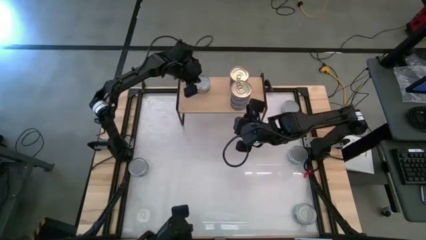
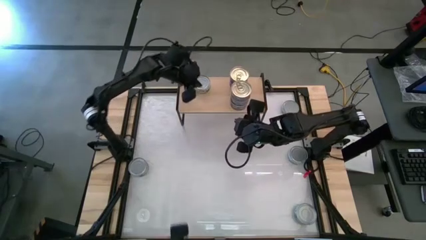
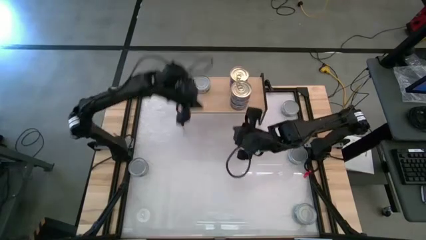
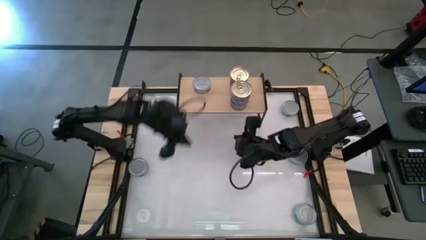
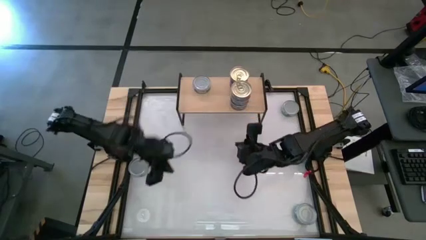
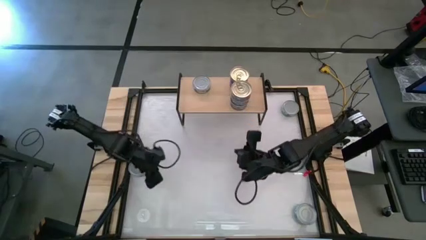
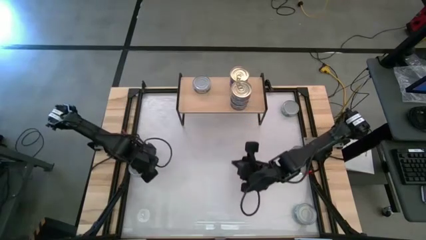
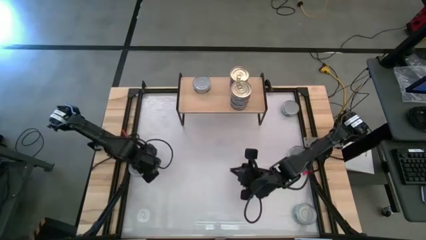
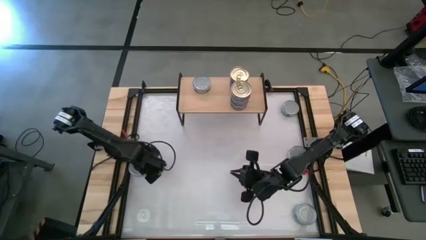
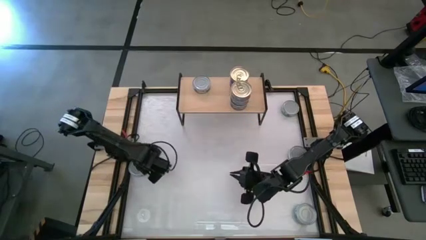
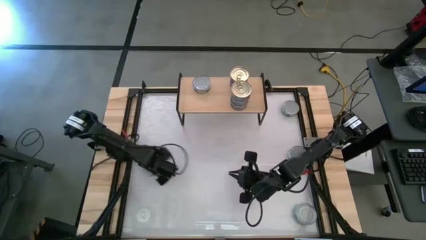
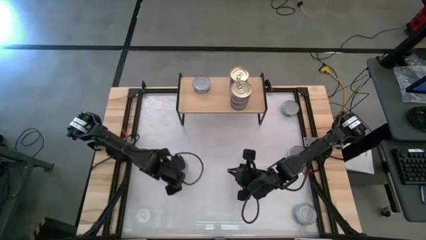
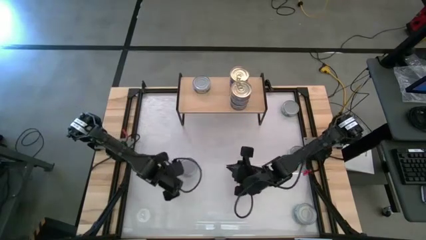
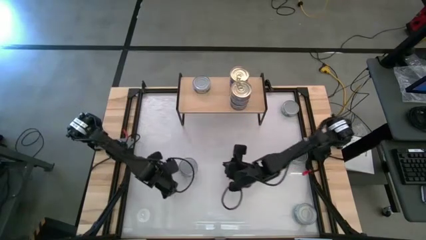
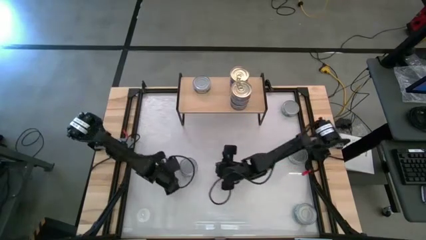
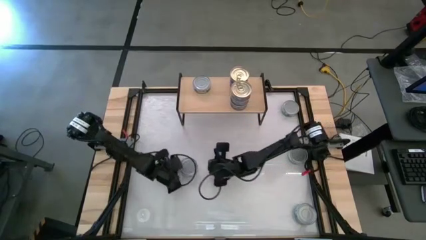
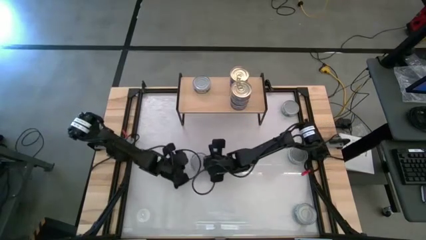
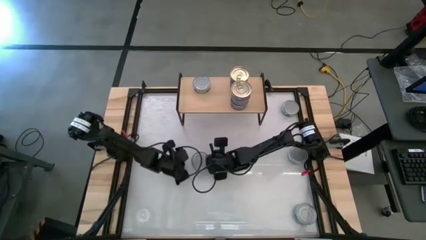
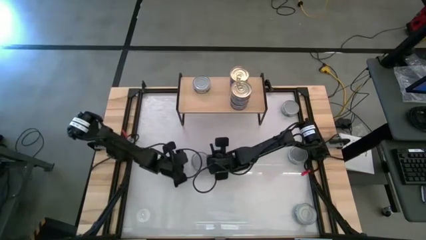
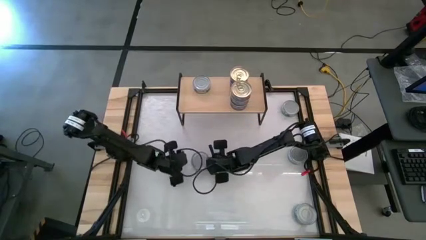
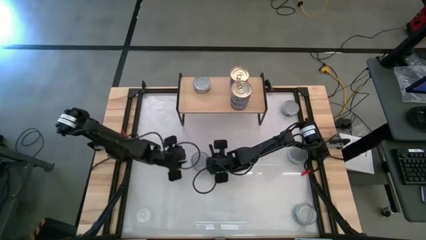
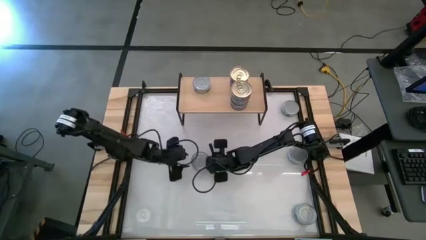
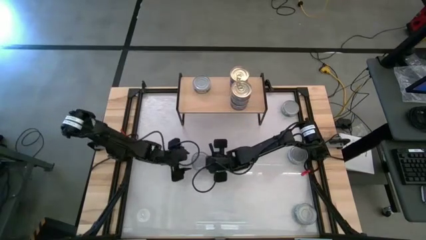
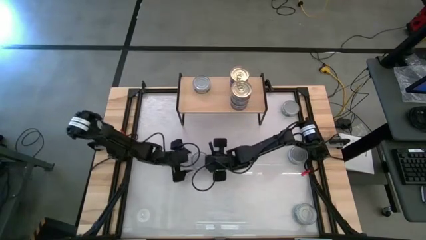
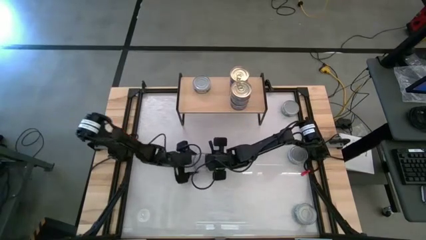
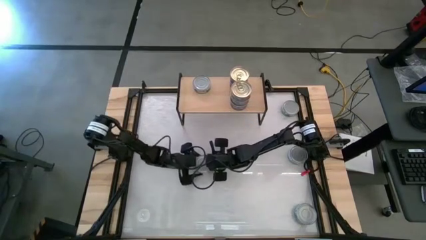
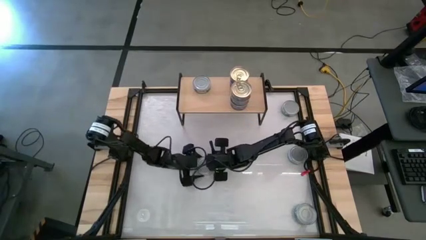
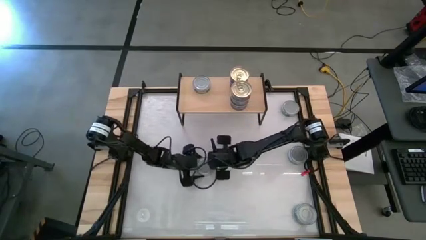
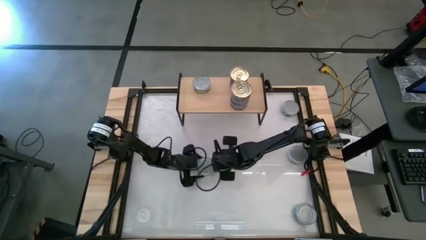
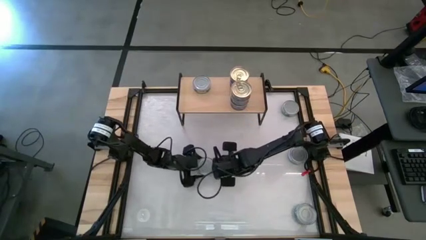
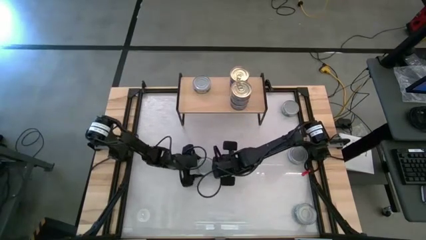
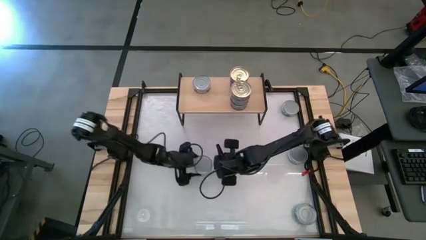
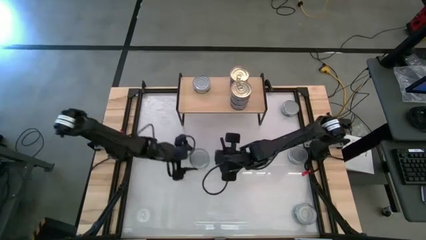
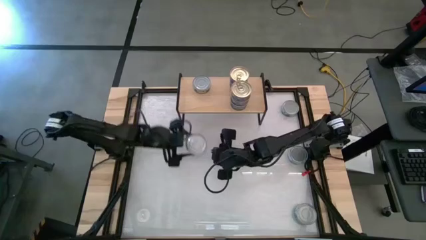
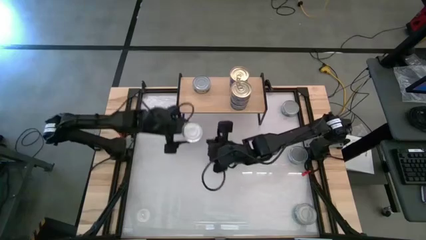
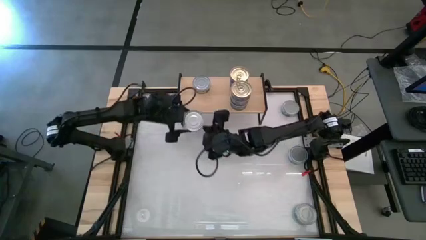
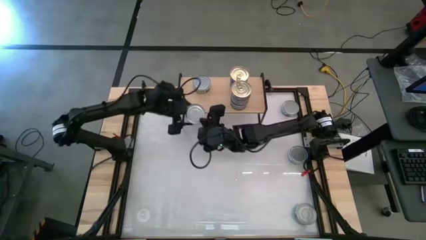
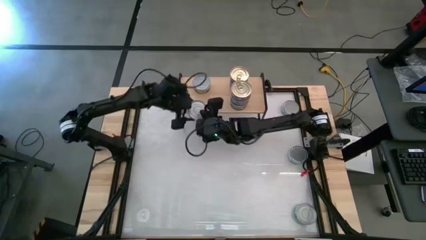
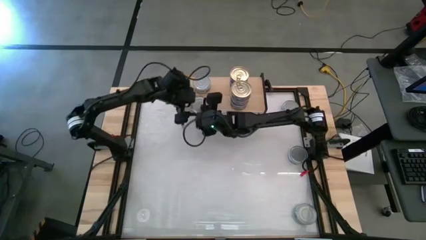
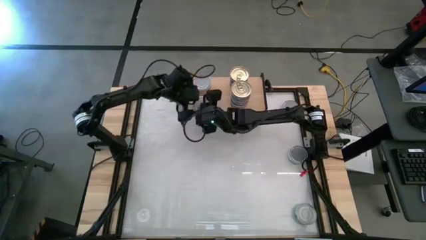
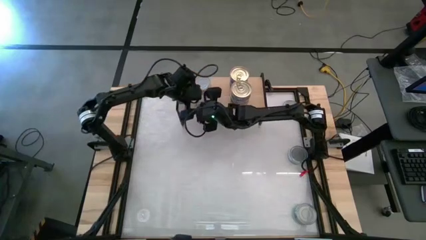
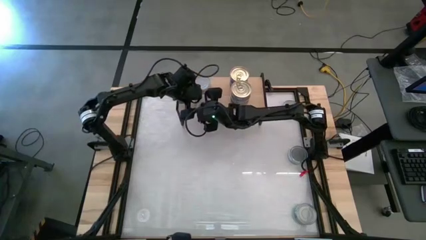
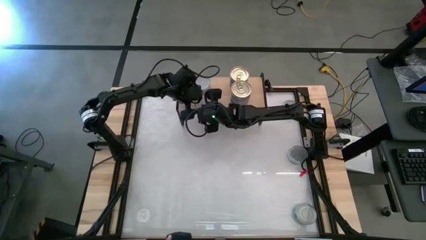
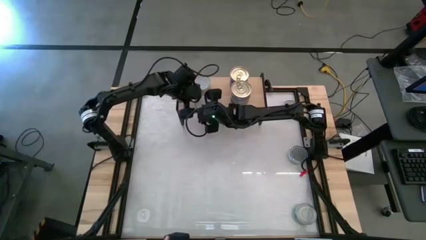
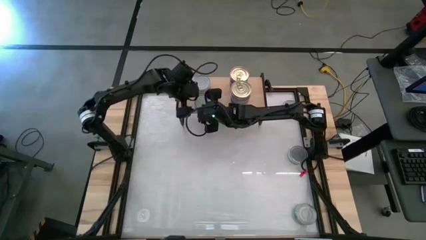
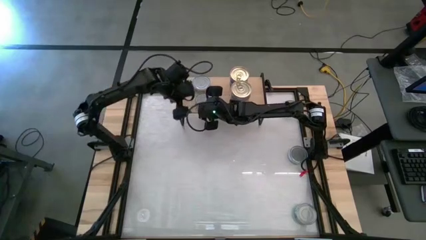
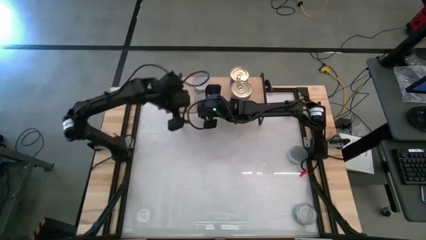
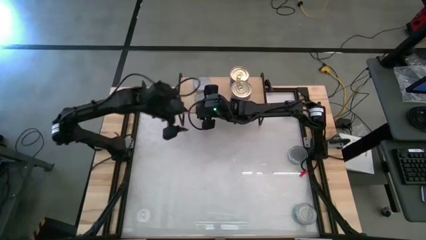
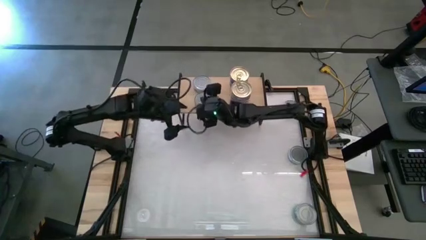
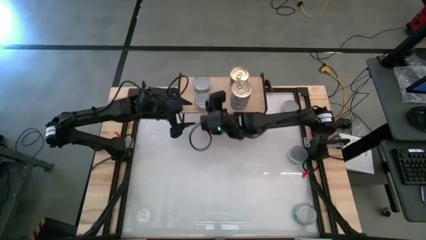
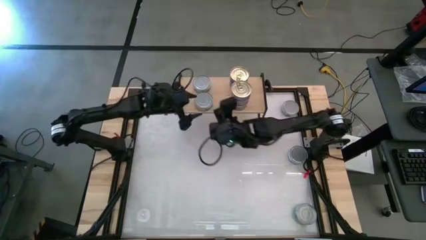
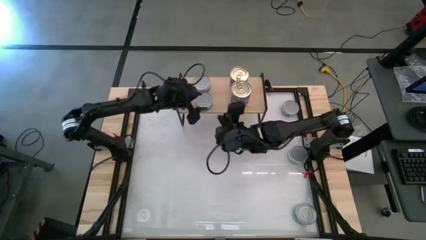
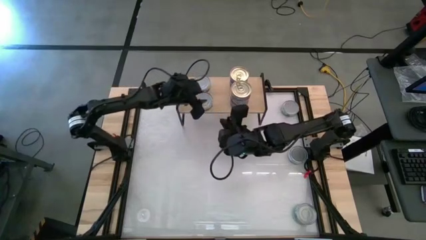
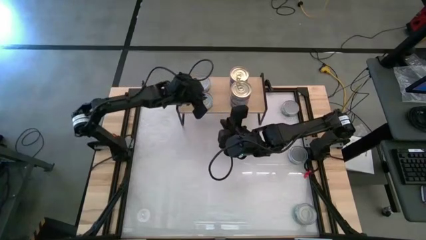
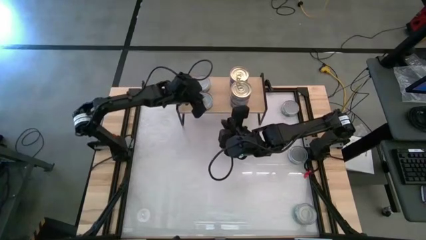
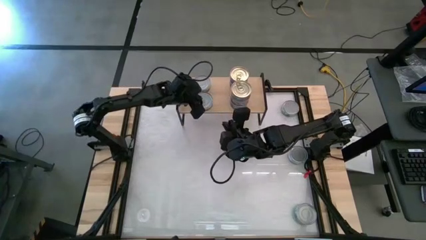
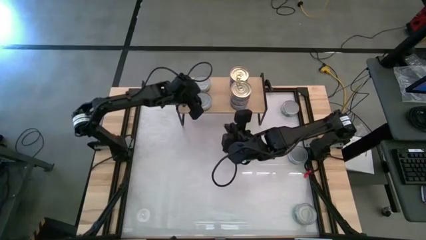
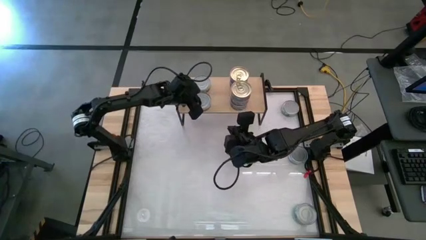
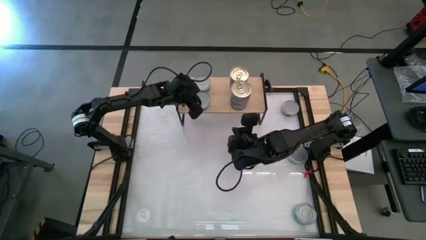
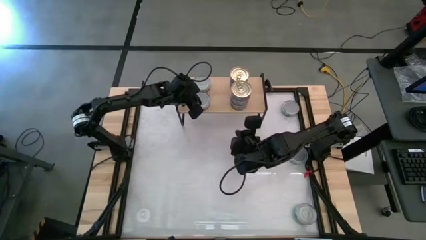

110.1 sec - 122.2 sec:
Task: Stack canned seafood by type on shelf
Put the green tuna can on the shelf

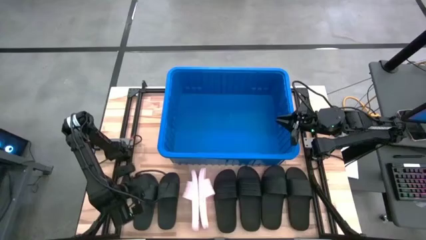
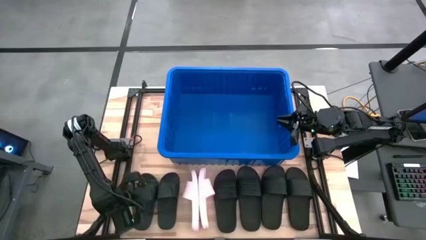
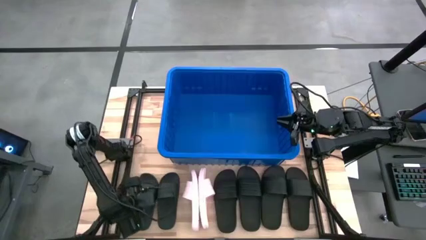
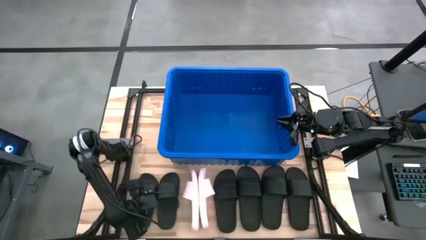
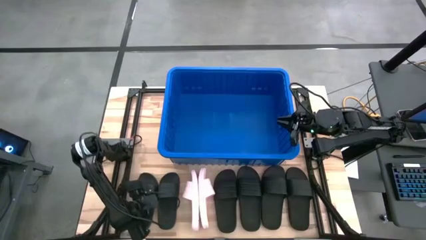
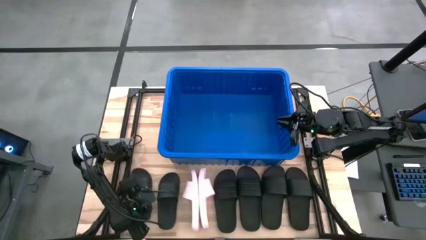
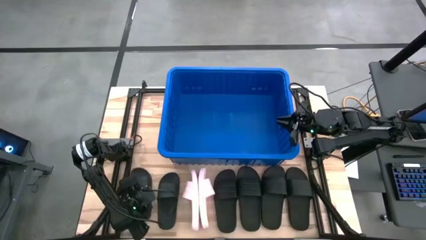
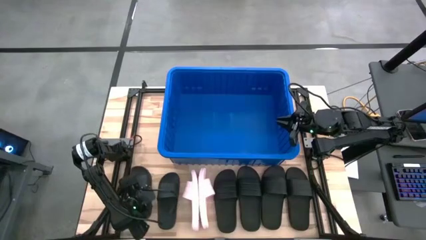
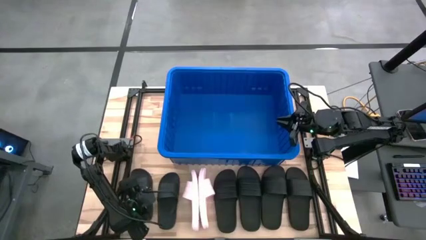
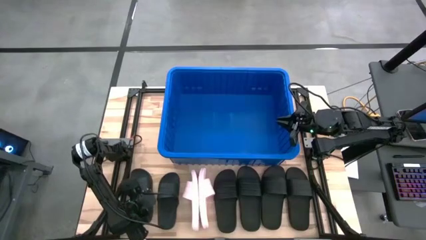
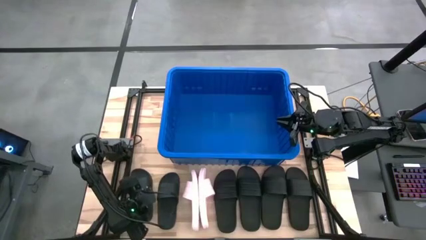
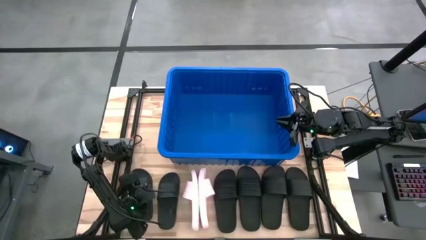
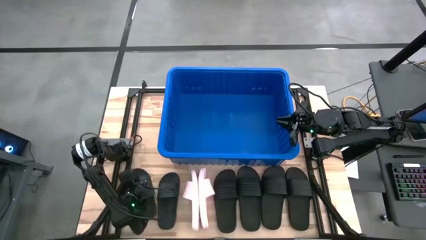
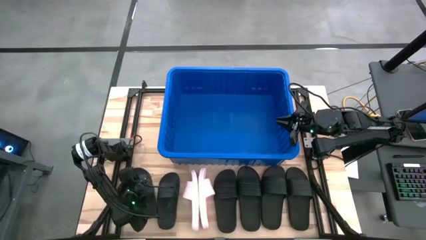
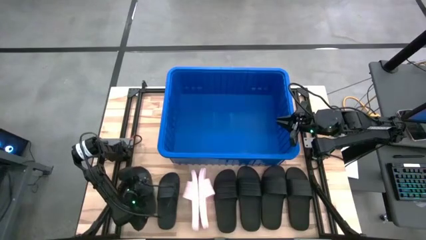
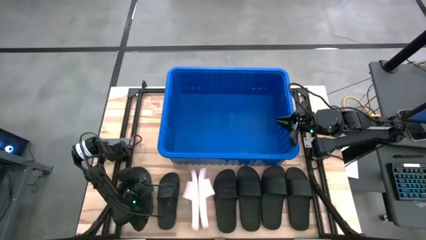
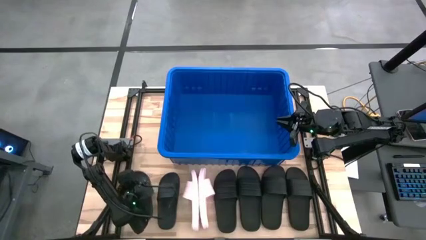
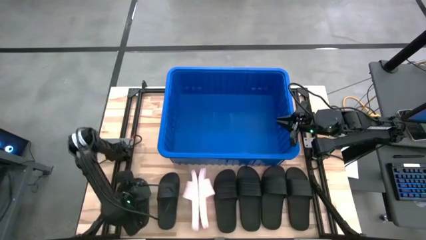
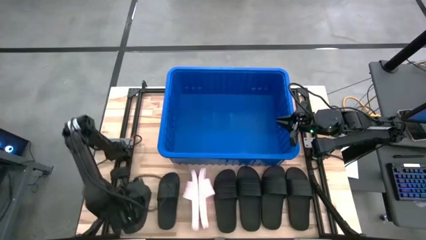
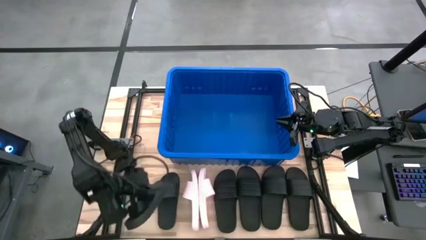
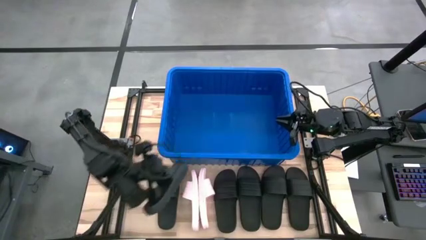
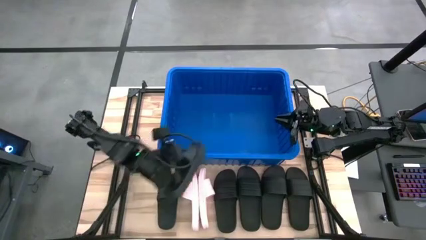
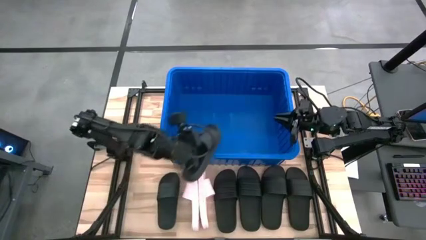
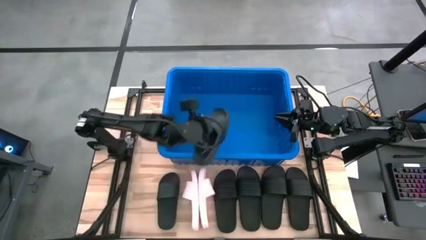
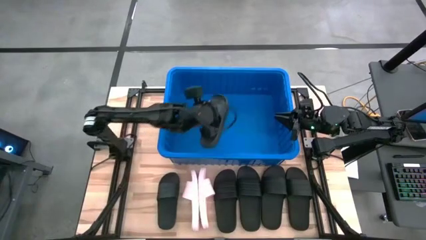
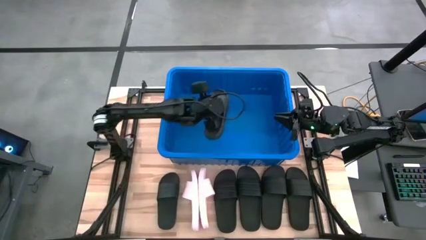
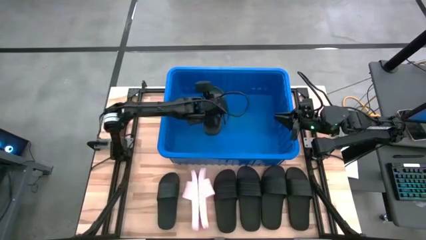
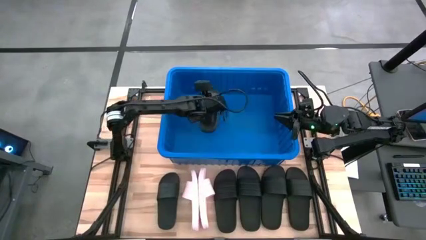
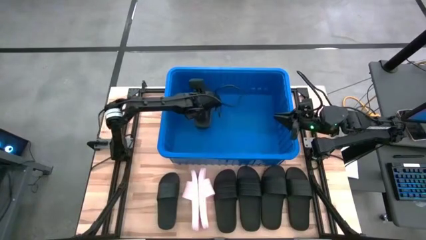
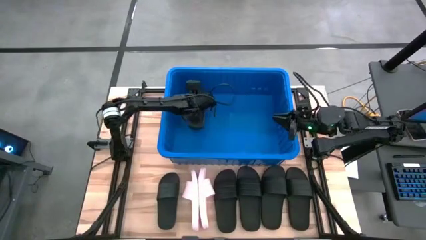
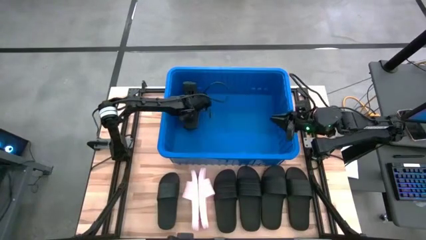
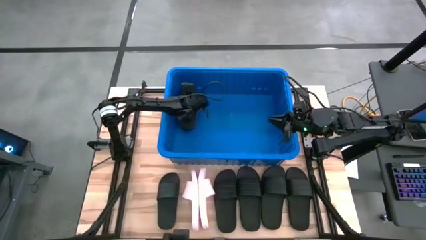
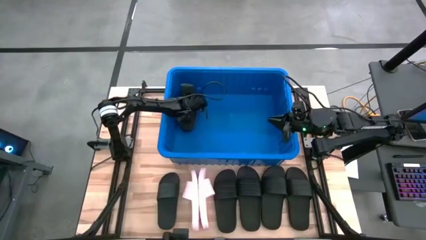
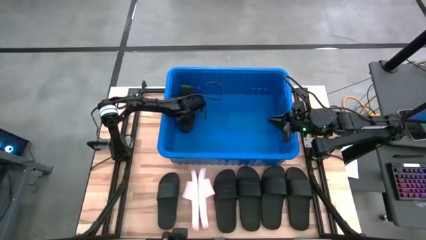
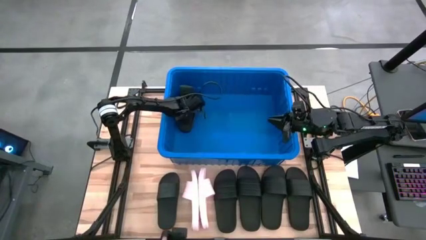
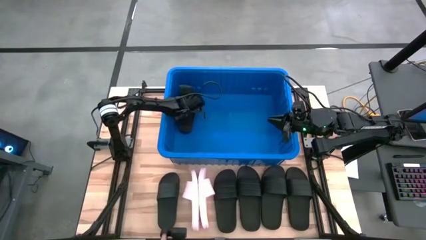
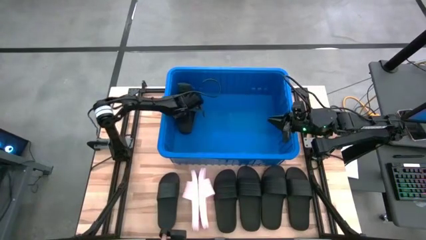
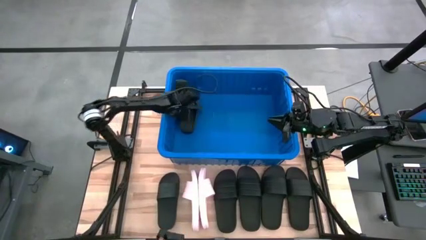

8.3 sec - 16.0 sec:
Task: Pick and place slides into bin
Put the black slide into the blue container
